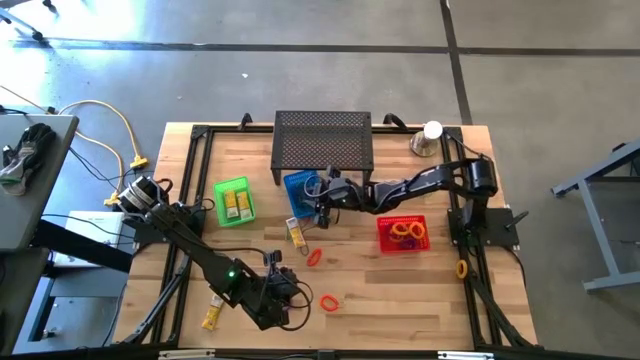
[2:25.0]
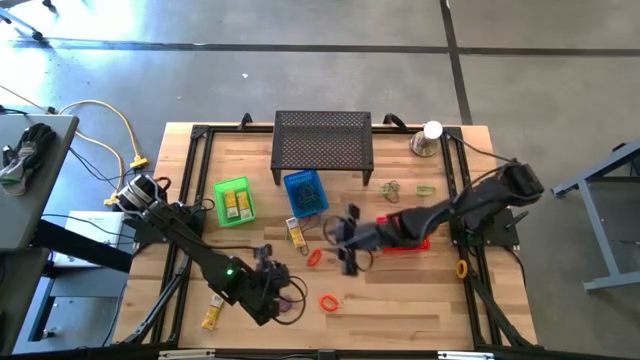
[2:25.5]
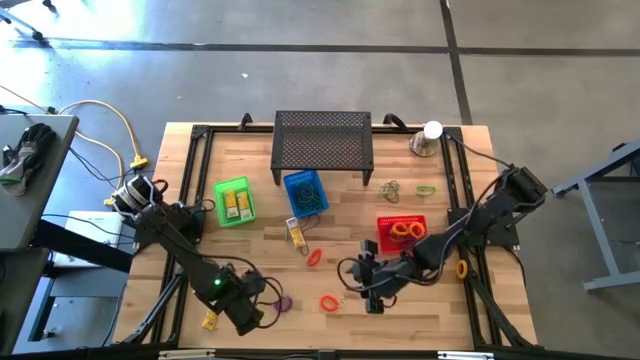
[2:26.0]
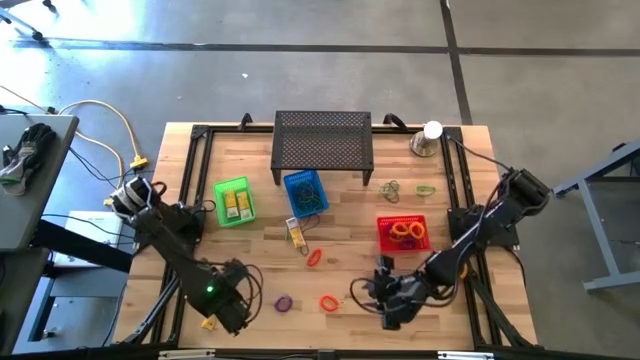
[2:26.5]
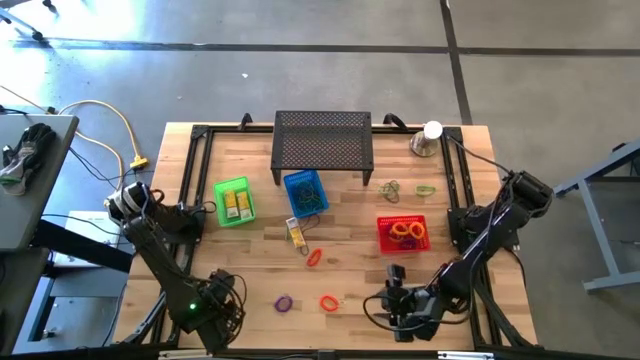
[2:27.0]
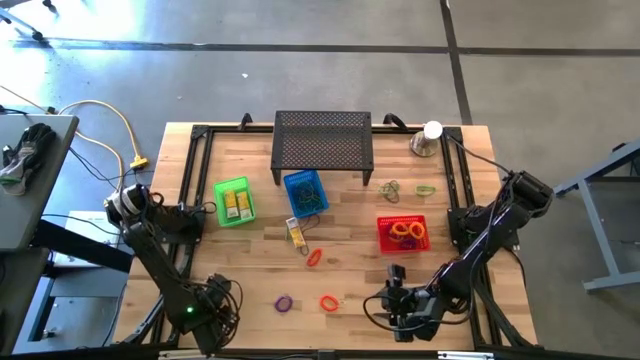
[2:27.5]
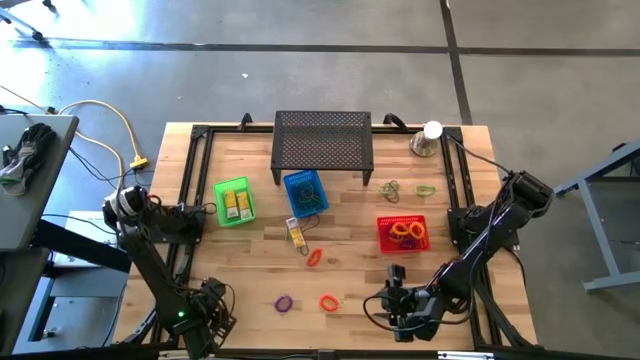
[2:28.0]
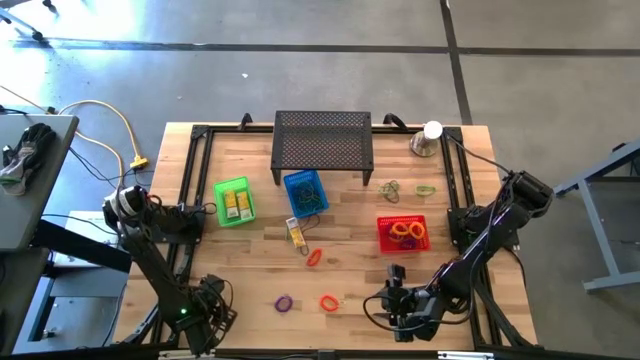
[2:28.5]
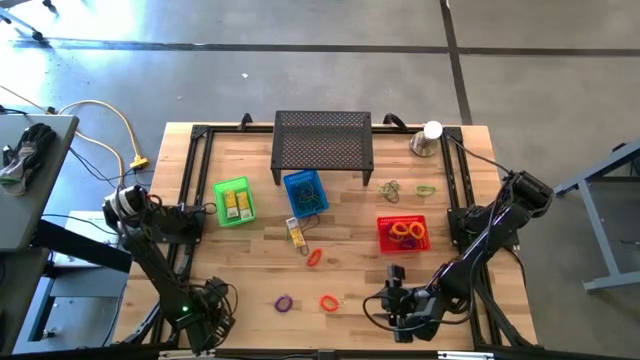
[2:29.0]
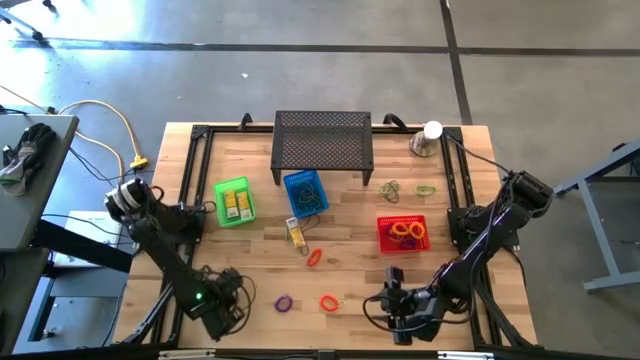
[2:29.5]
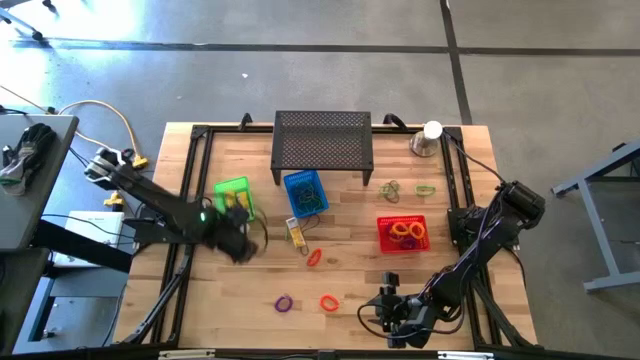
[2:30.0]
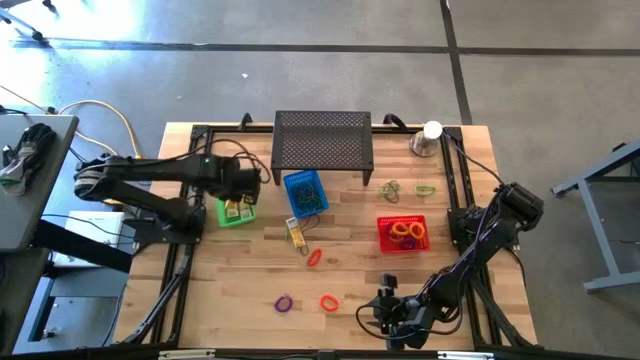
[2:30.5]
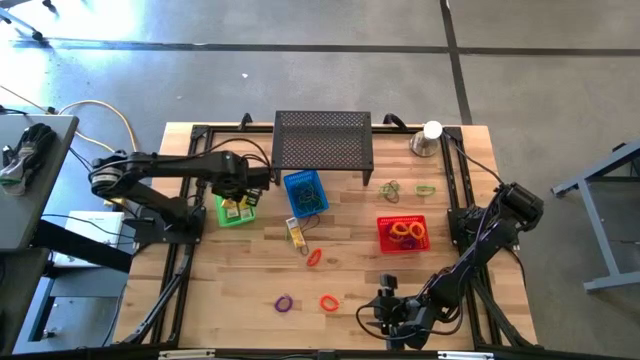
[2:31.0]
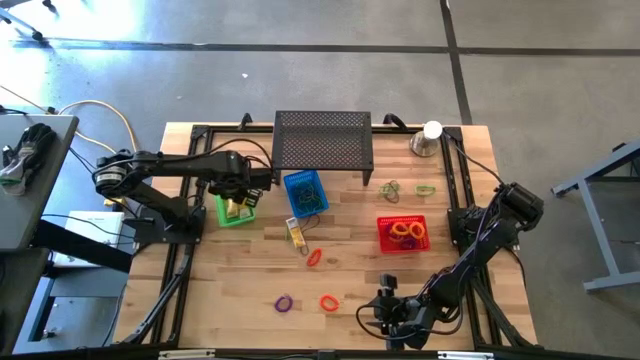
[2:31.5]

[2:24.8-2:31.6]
Task: Pick & Place Office Desk Supplies
Put the yellow crayon box into the green basket

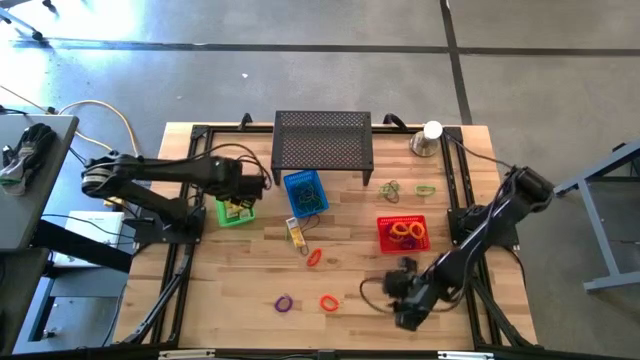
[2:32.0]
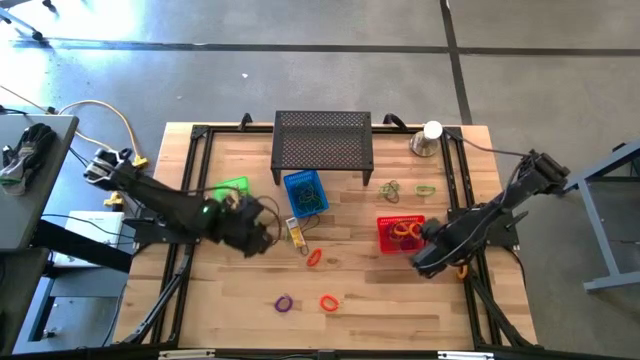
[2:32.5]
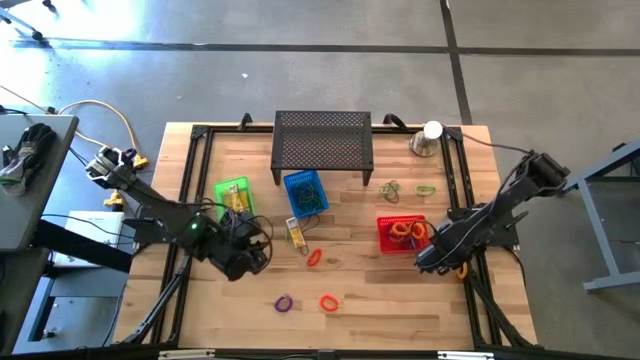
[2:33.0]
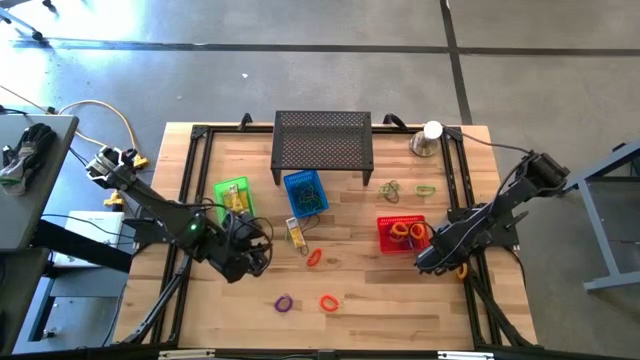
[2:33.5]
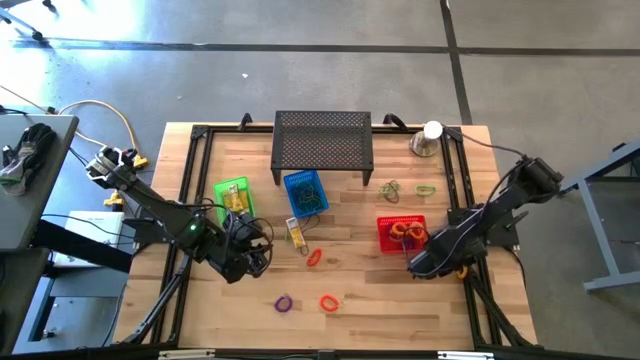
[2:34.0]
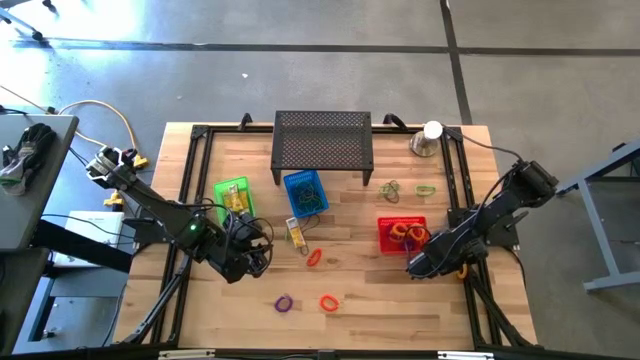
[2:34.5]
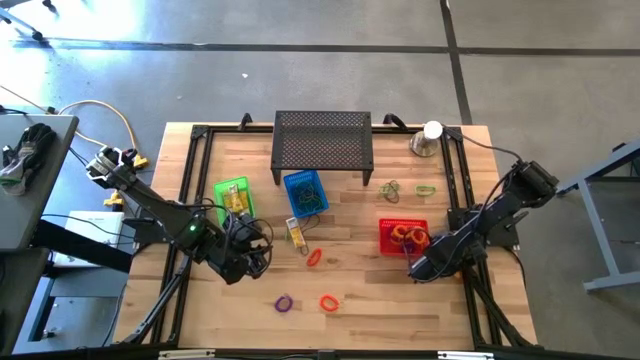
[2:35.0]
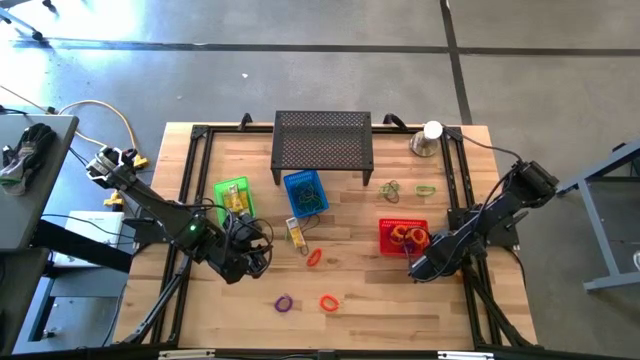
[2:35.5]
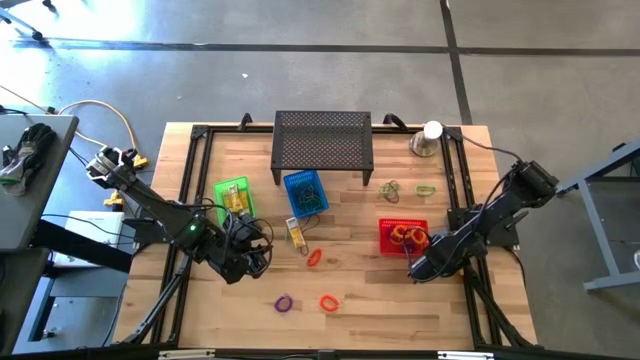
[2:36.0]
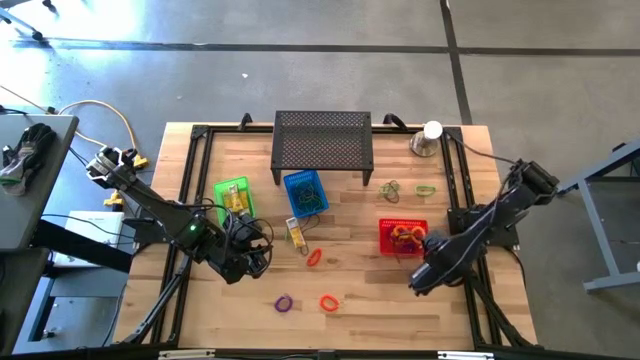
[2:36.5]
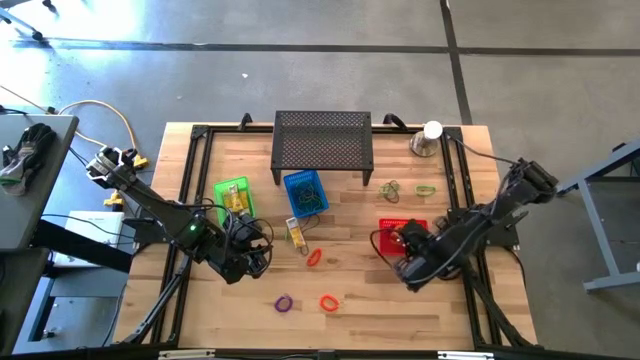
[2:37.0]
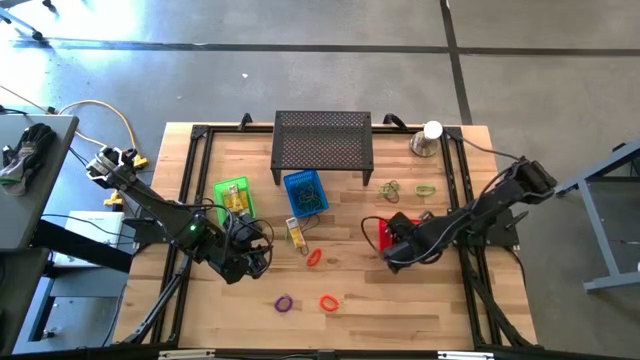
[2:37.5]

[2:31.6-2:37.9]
Put the orange spring keychain into the red basket

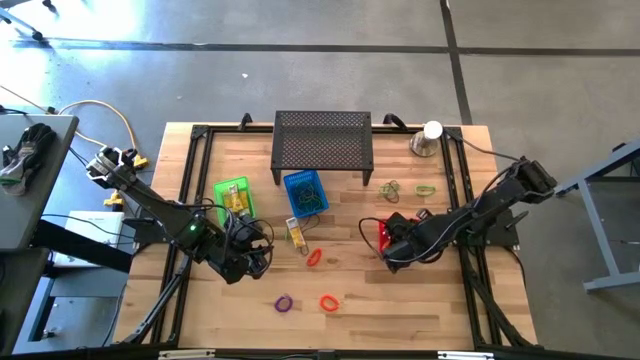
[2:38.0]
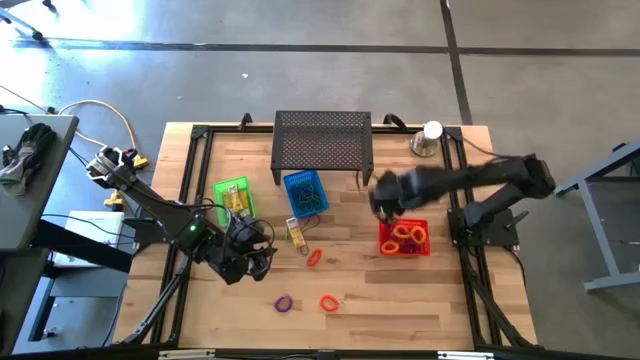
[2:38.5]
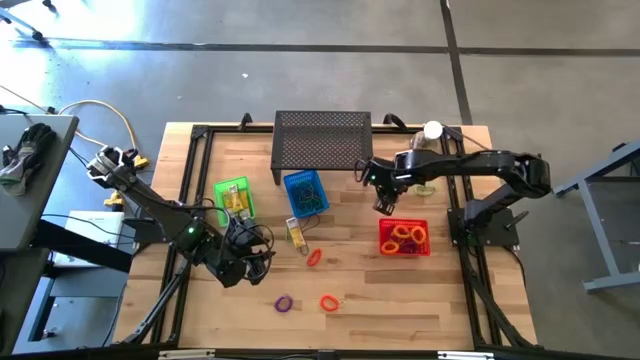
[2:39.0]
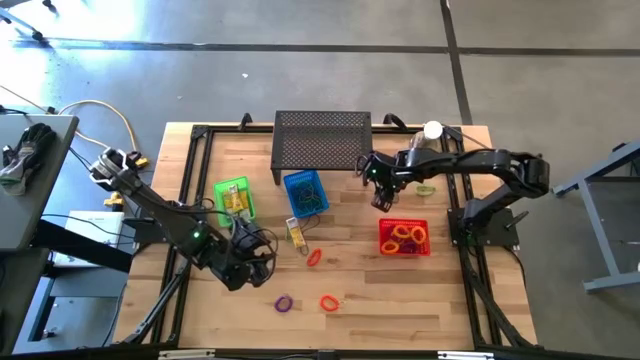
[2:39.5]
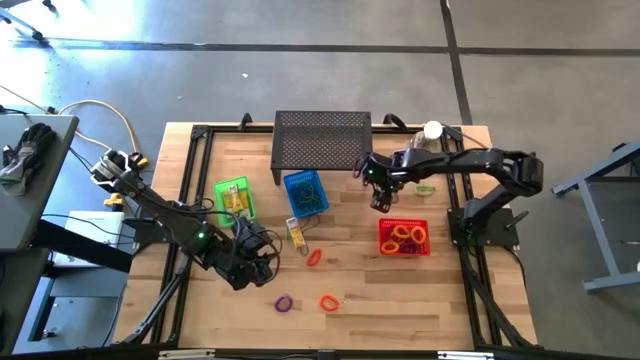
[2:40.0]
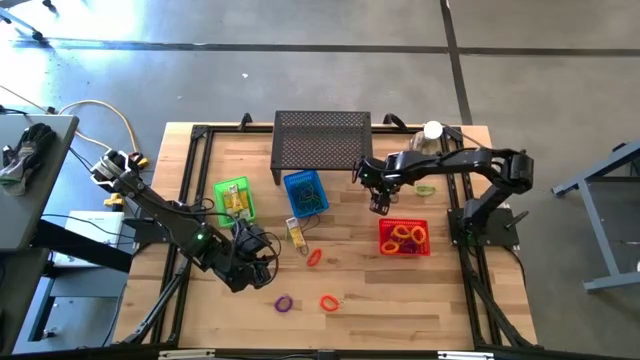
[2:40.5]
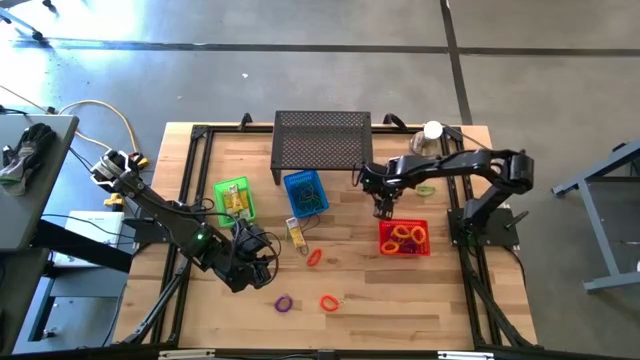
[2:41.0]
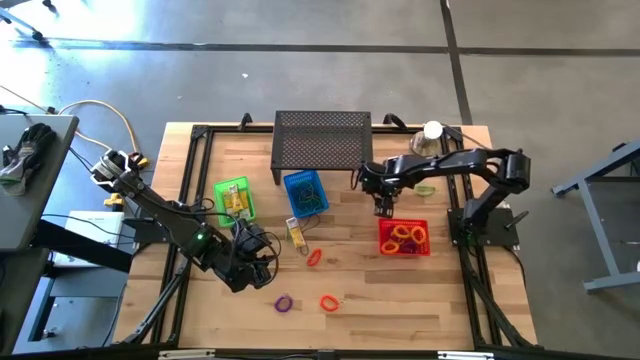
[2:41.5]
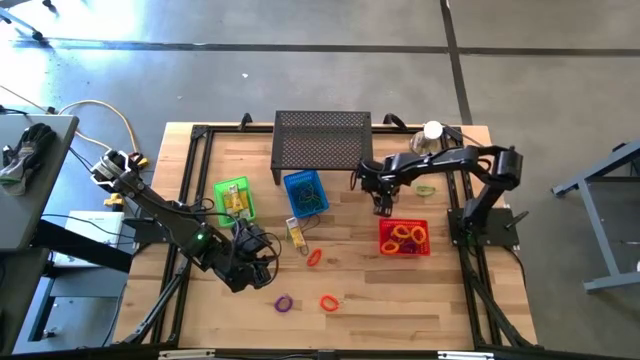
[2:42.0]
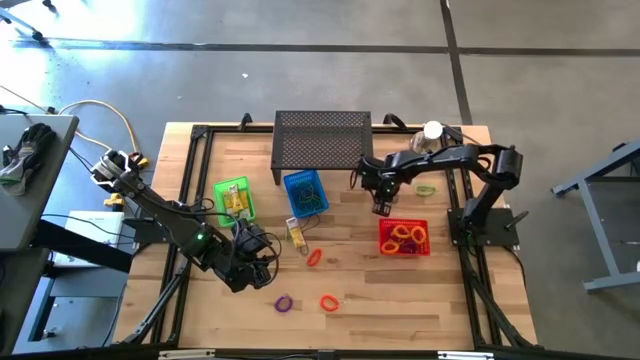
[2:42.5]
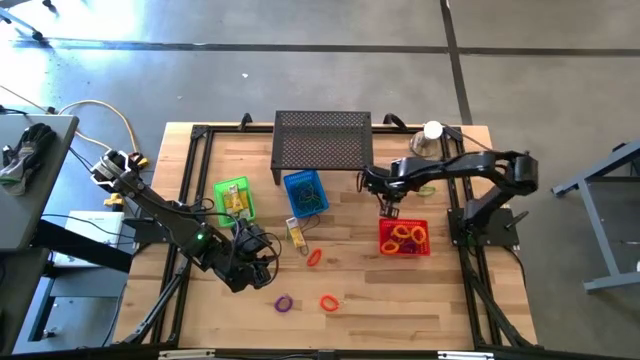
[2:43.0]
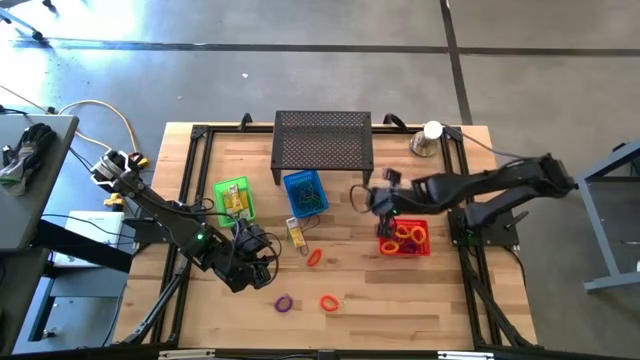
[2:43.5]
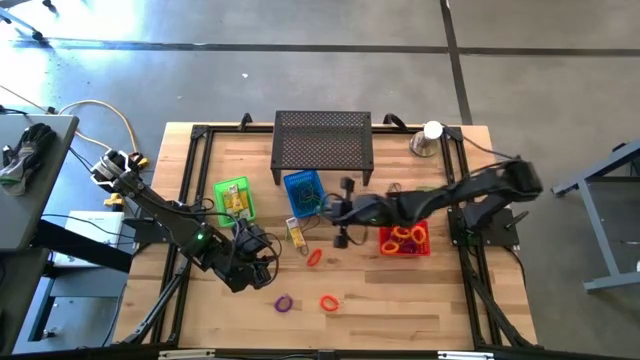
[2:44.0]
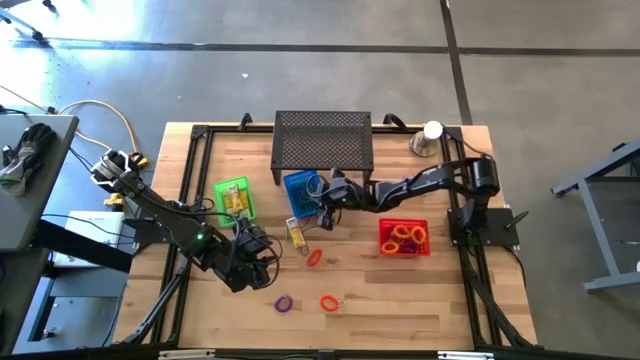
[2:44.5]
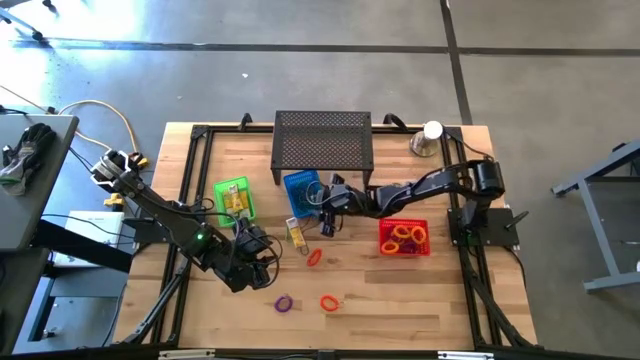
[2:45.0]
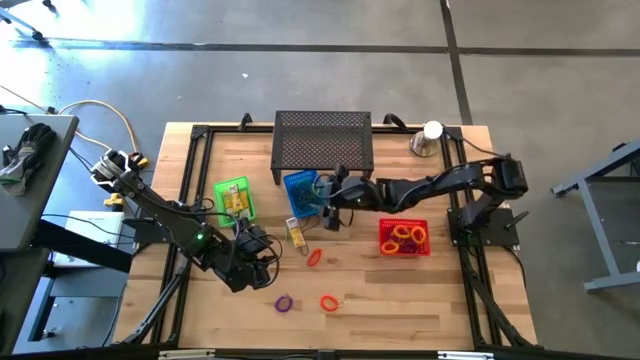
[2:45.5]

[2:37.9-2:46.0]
Put the green rubber band into the blue basket
